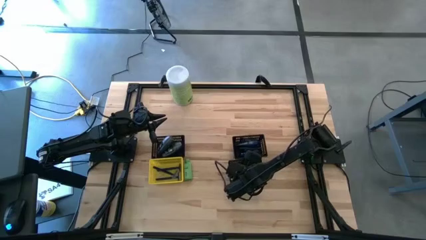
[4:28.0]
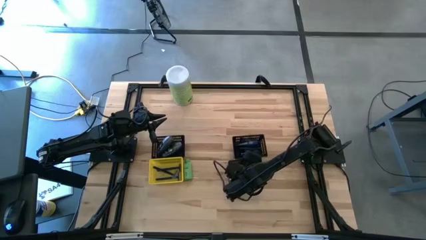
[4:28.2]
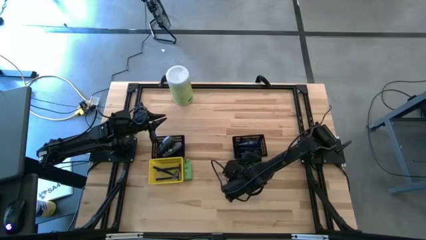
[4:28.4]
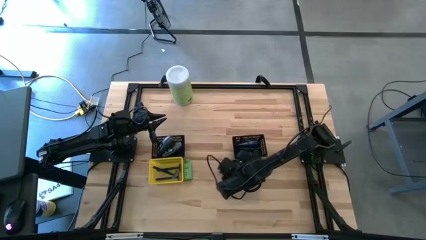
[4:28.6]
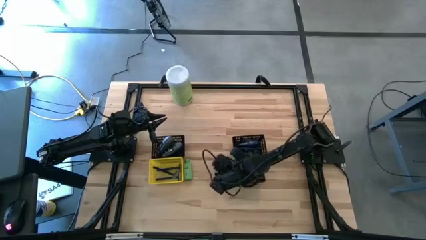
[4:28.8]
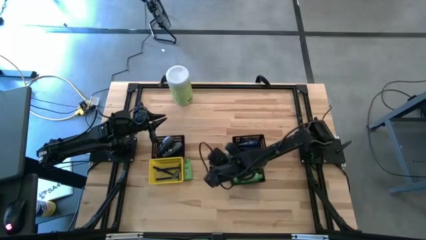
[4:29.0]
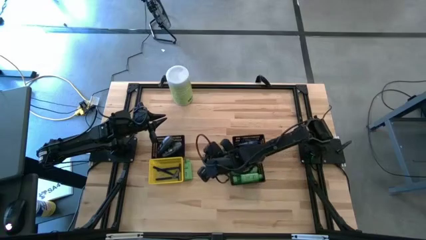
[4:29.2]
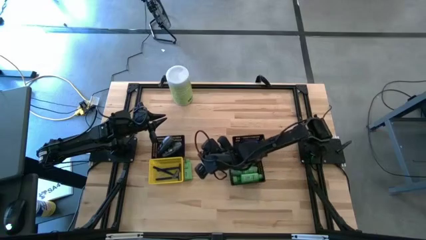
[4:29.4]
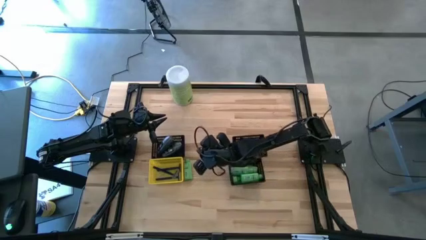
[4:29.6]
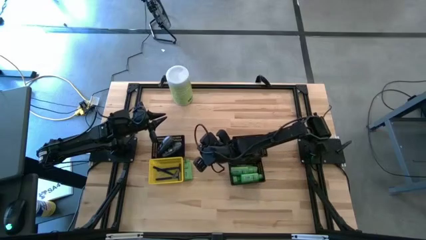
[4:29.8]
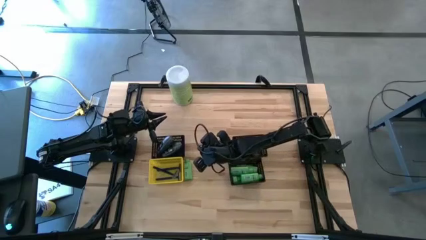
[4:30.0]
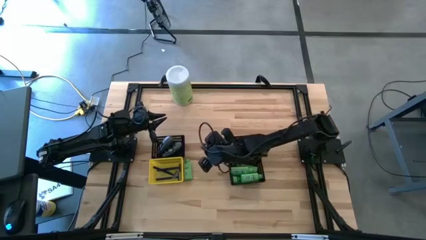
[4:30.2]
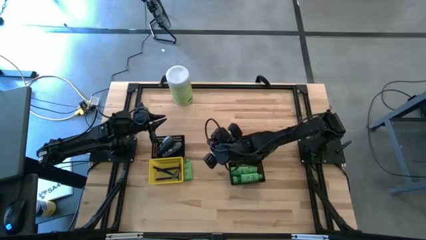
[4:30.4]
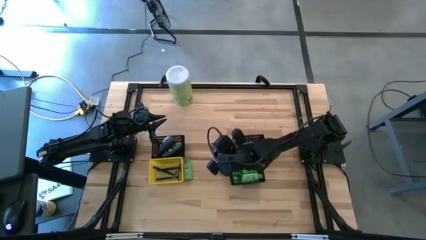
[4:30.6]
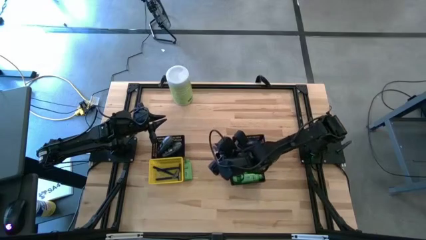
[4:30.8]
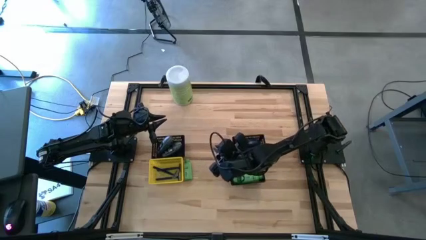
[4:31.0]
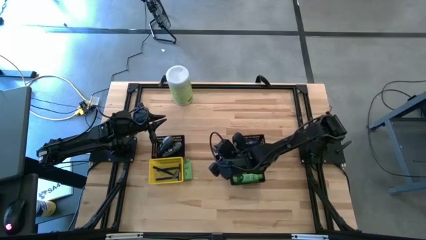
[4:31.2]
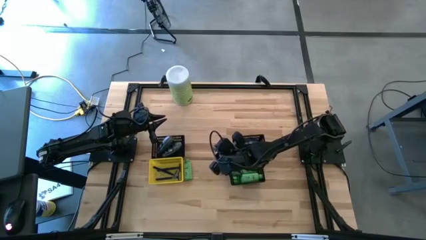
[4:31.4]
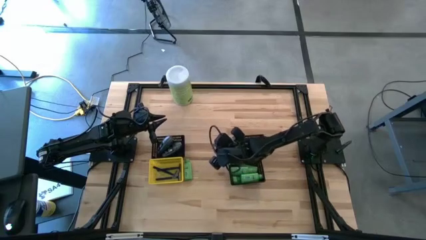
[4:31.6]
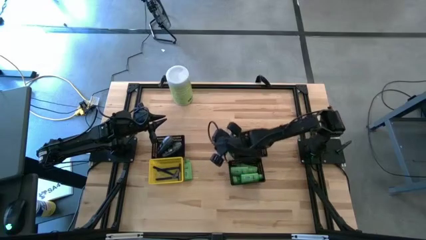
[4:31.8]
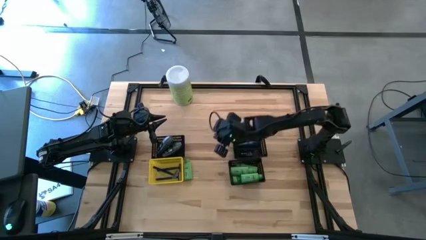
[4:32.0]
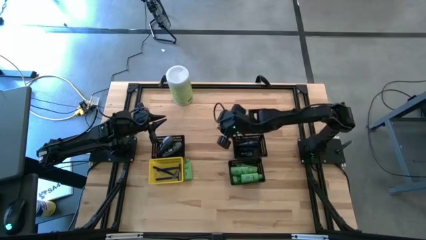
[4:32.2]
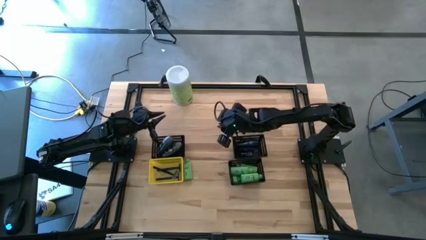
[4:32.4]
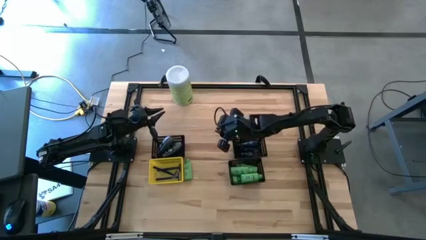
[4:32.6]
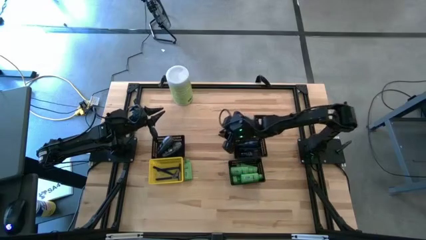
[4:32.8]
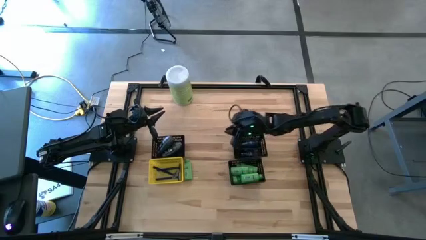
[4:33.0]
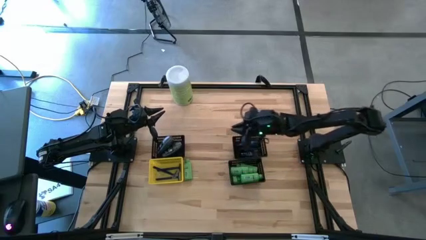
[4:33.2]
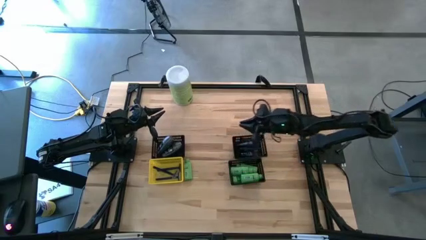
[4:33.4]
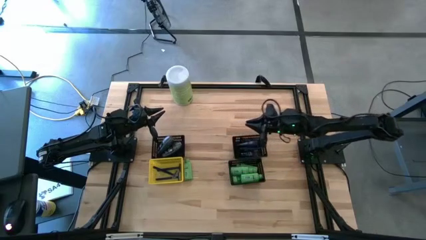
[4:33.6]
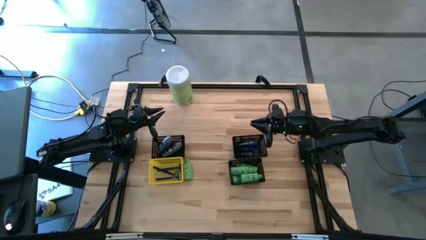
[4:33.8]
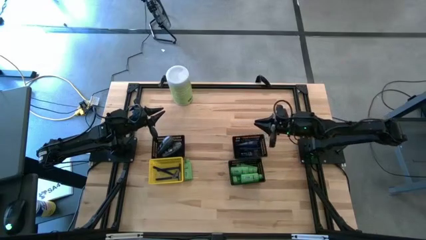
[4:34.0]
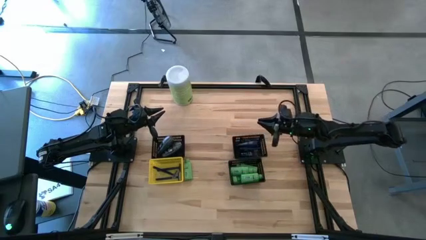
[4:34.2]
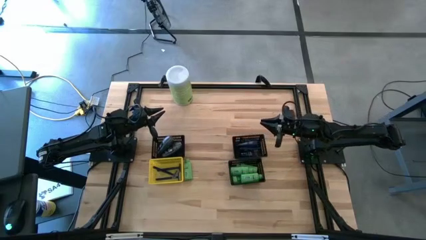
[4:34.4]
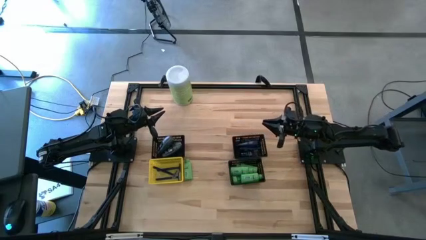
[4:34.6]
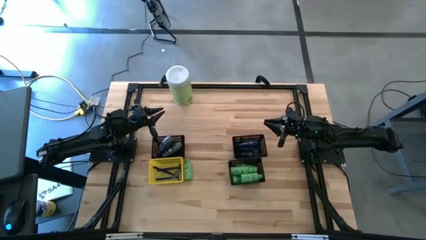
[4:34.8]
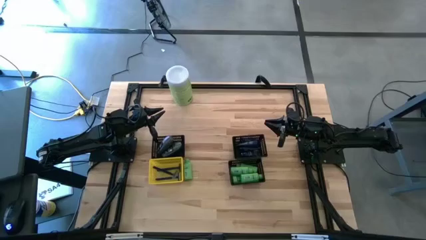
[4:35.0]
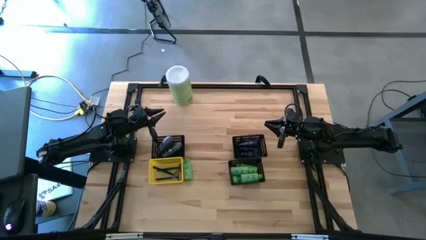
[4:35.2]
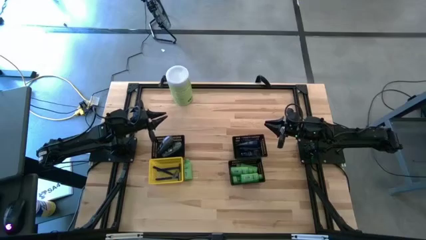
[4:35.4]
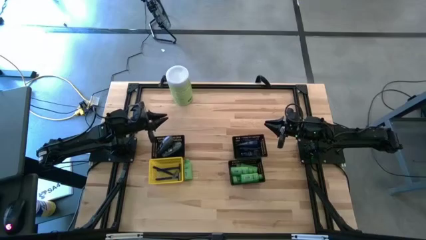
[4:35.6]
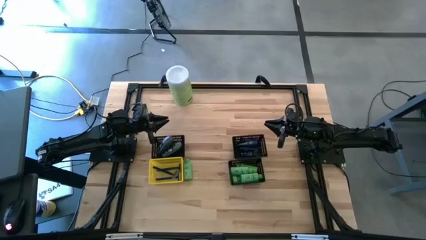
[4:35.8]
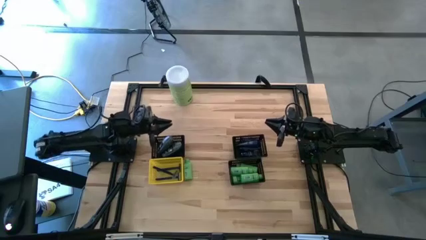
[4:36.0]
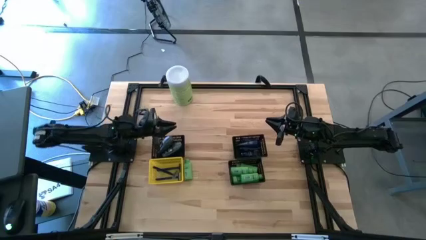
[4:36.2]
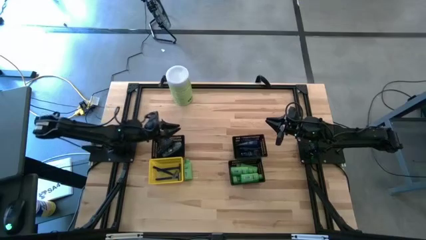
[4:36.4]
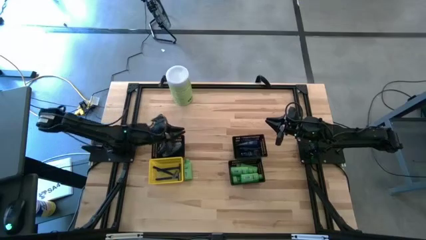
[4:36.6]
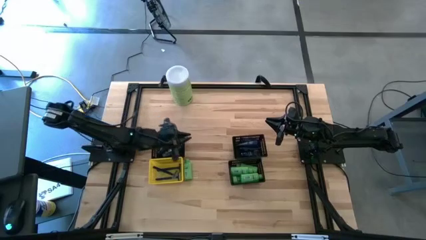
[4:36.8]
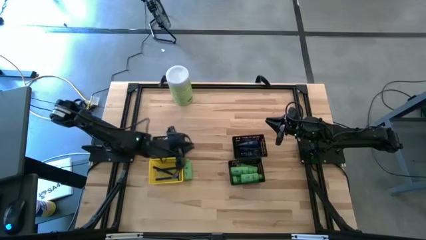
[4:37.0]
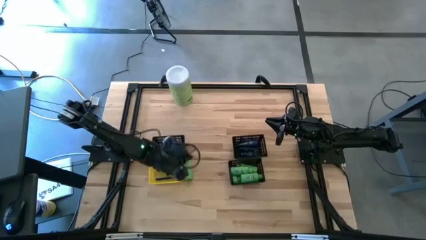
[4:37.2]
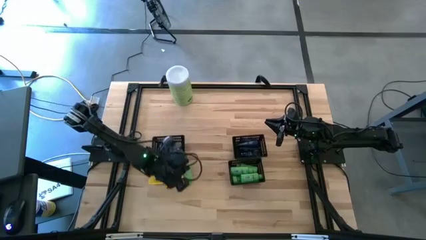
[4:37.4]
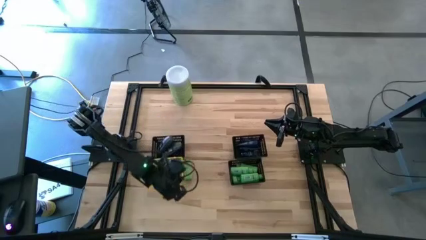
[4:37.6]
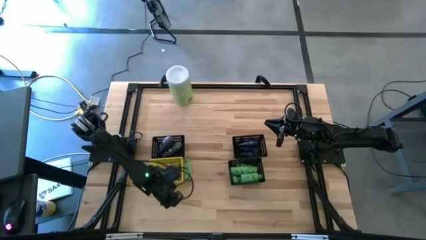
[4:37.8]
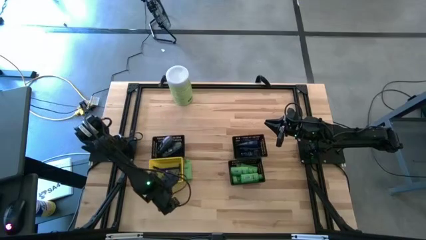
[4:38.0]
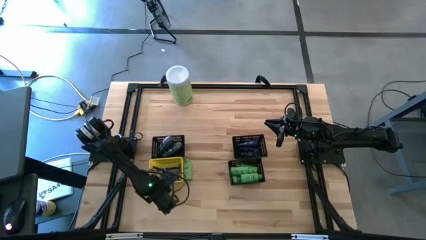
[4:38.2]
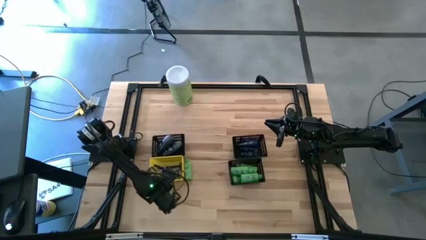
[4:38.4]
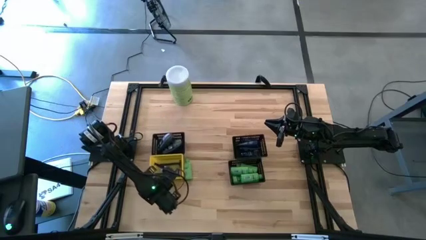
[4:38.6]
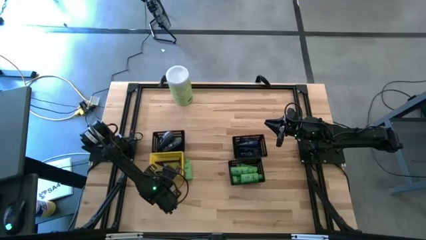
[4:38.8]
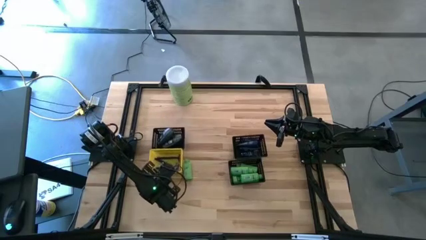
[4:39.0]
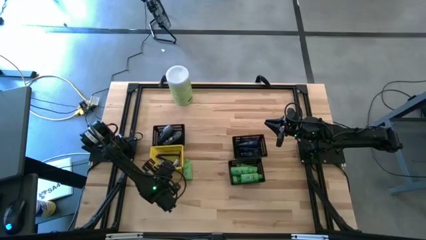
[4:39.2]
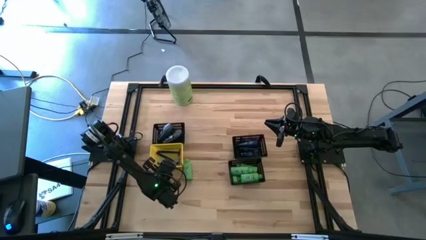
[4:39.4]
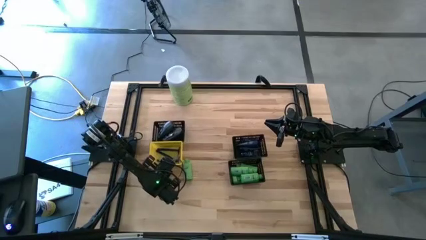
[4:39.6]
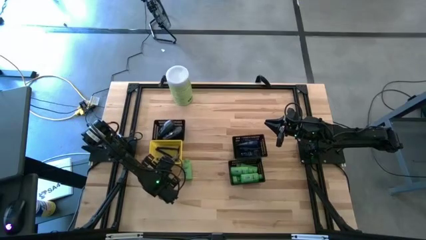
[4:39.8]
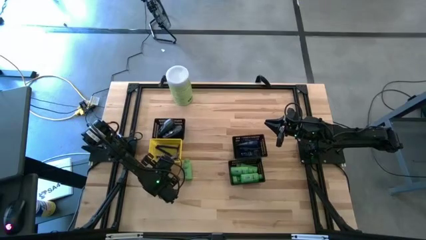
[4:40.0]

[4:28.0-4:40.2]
Task: Pick & Place Travel size toiletries
Adjust the bins

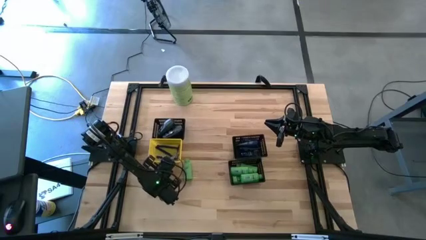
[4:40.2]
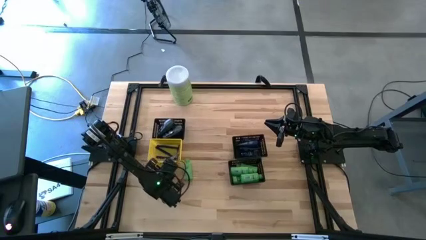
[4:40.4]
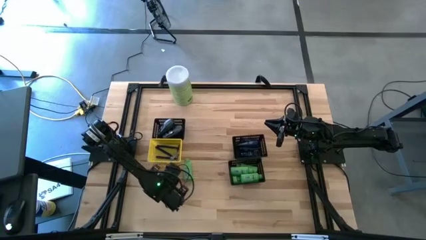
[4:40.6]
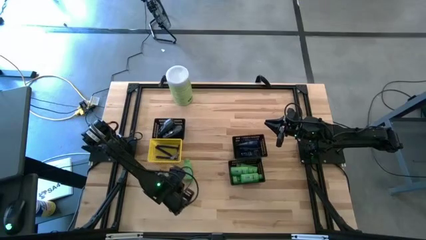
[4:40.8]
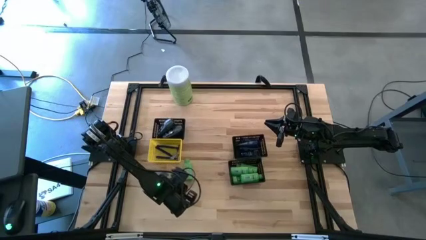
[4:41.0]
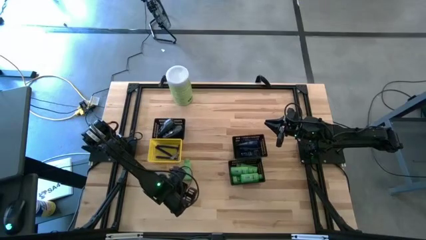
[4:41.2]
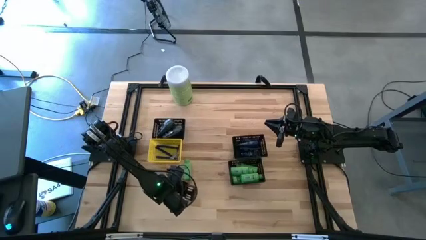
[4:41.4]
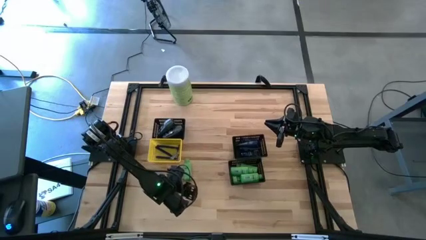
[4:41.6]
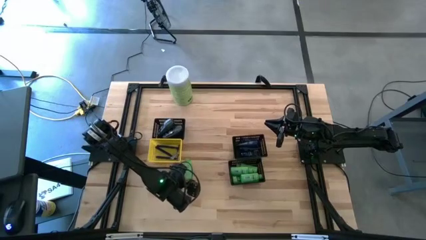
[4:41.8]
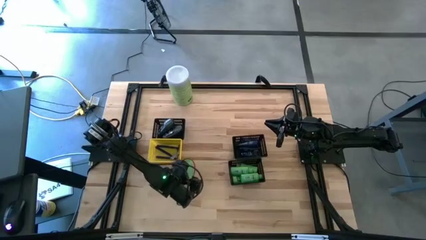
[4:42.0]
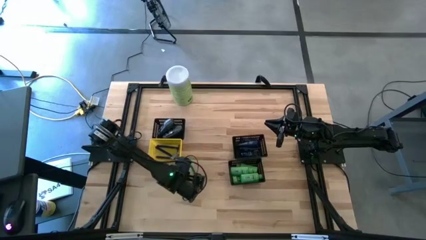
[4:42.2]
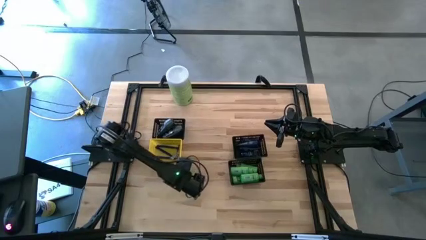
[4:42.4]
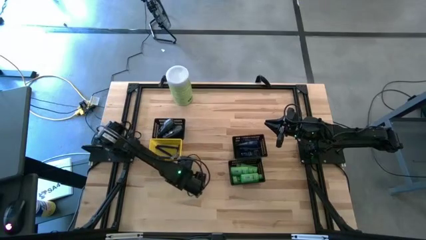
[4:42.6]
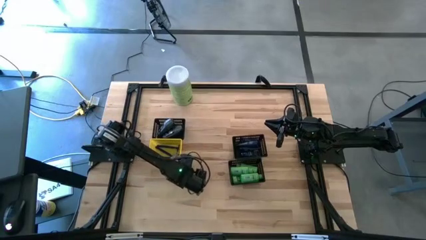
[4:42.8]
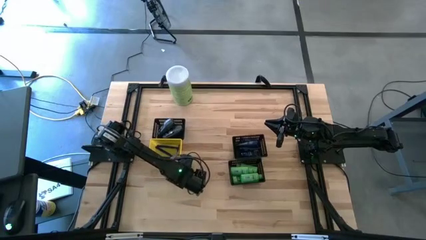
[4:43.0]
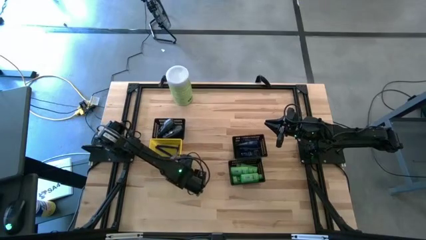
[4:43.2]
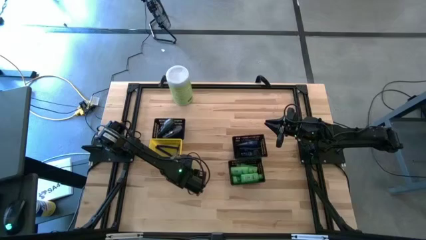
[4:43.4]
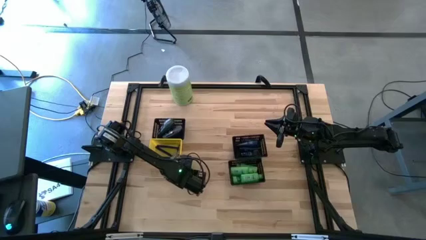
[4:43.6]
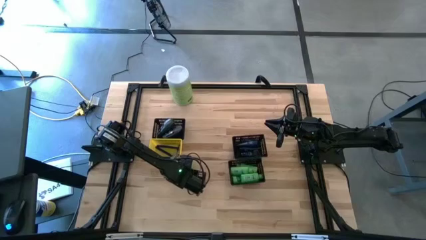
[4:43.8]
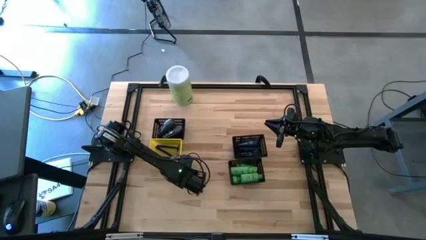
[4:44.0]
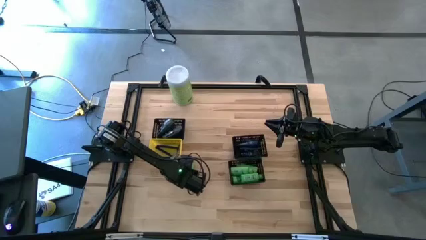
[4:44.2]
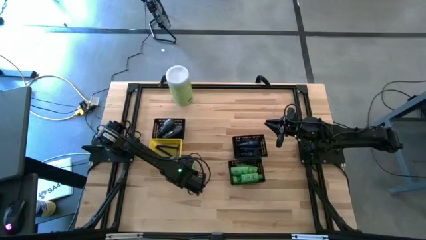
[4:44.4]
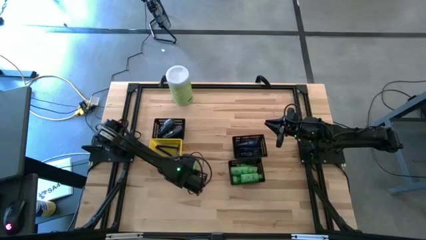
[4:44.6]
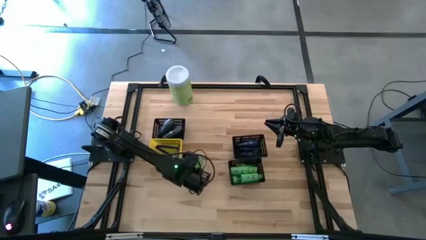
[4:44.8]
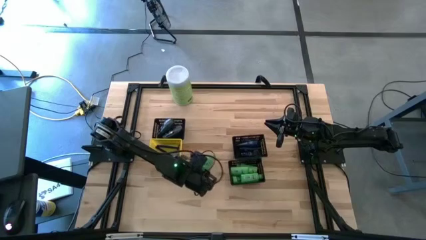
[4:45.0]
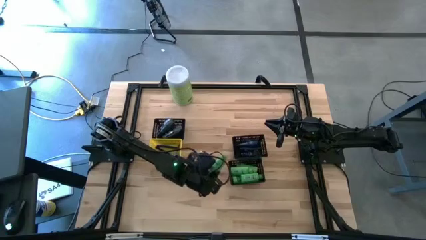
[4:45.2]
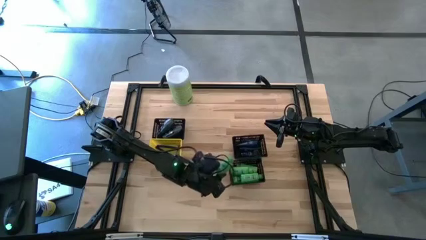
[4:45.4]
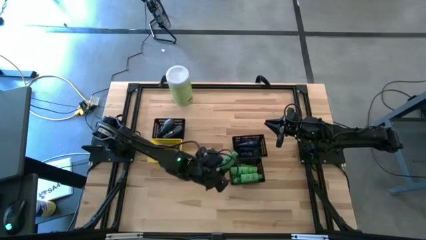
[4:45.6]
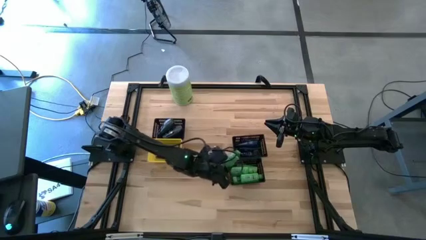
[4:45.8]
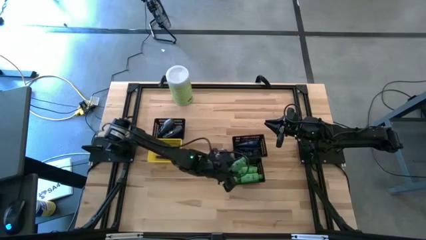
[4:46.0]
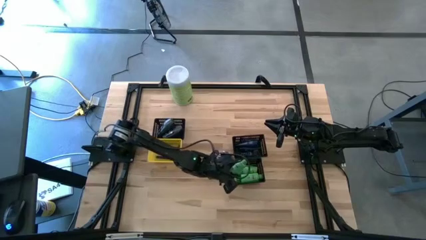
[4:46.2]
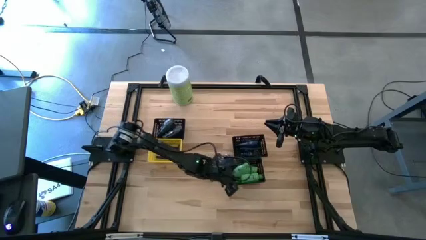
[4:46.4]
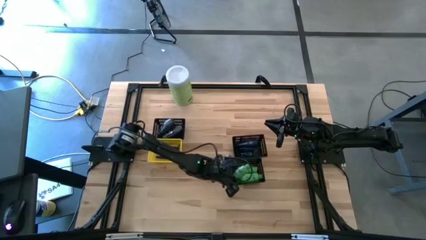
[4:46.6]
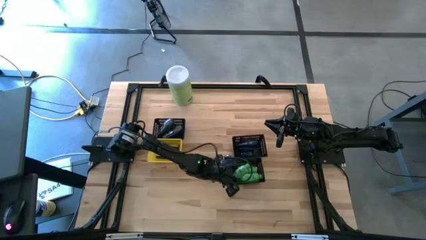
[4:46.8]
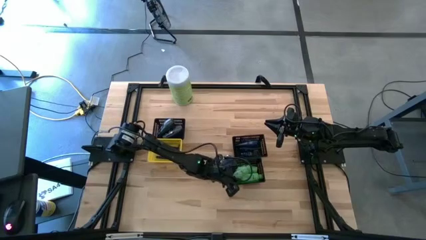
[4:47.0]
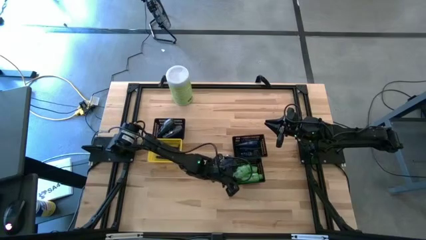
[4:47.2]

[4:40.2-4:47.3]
Put the green shampoo into the bottom right black bin
